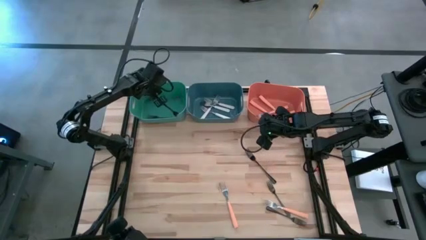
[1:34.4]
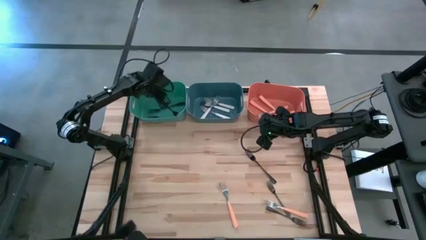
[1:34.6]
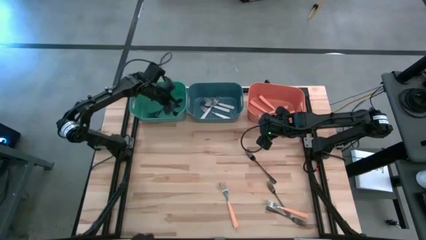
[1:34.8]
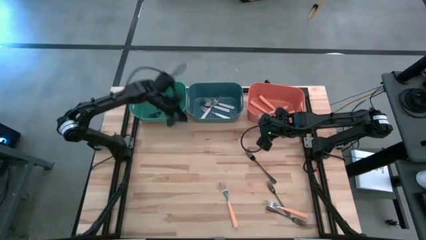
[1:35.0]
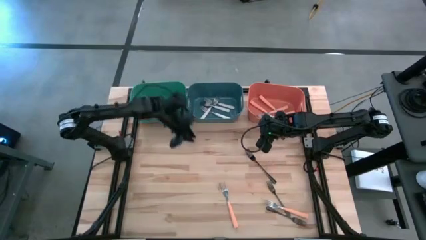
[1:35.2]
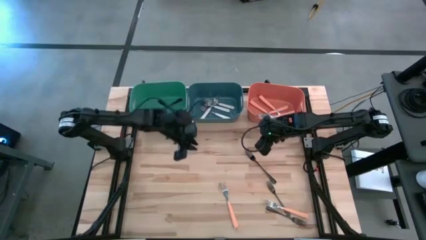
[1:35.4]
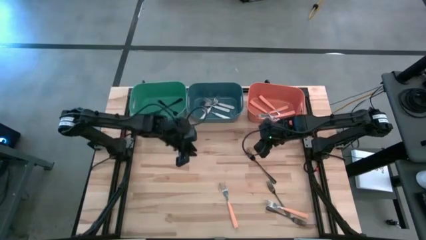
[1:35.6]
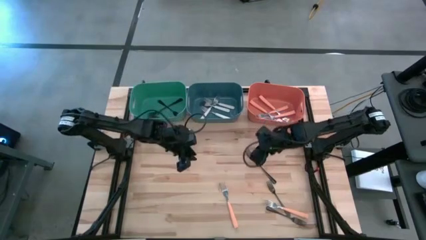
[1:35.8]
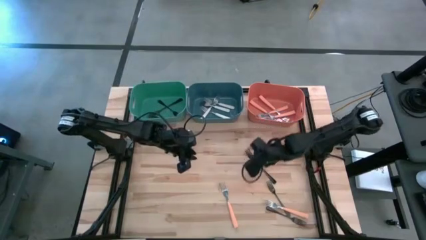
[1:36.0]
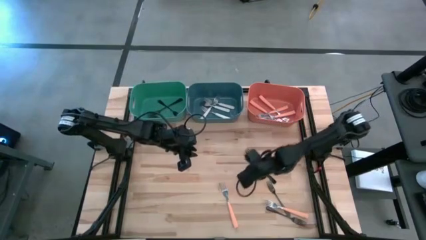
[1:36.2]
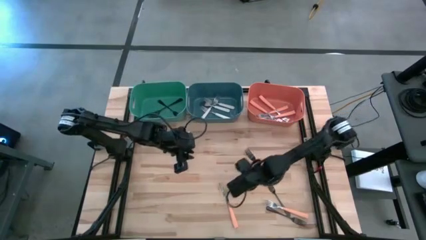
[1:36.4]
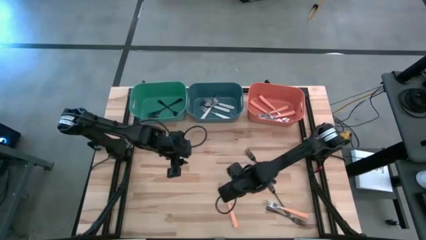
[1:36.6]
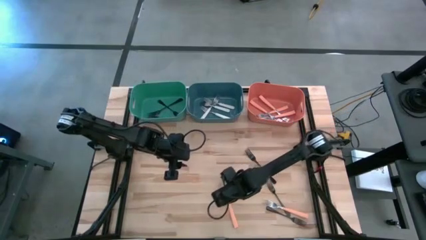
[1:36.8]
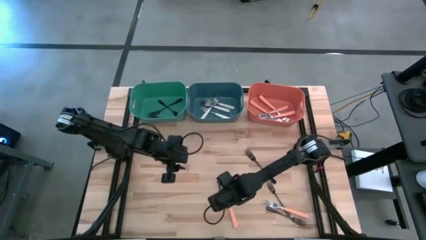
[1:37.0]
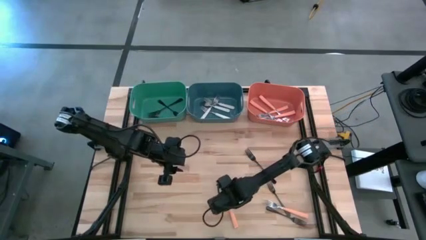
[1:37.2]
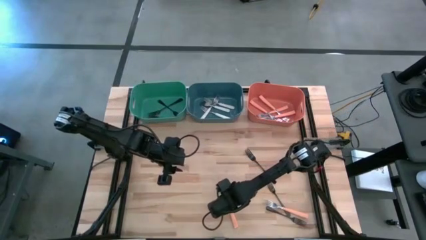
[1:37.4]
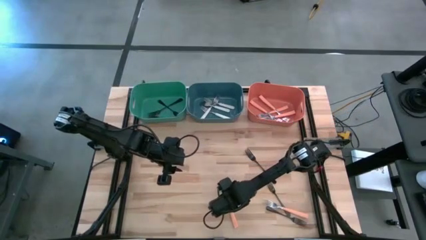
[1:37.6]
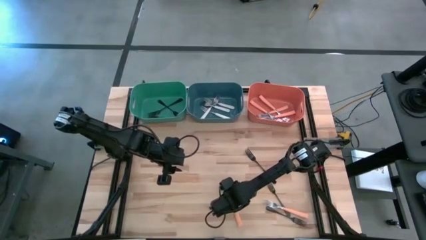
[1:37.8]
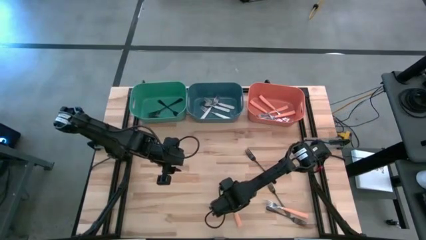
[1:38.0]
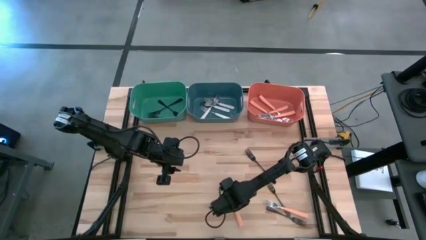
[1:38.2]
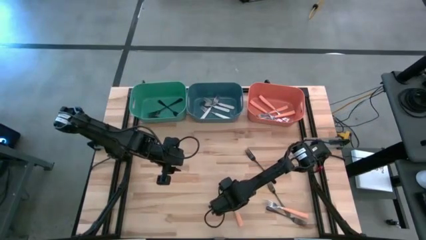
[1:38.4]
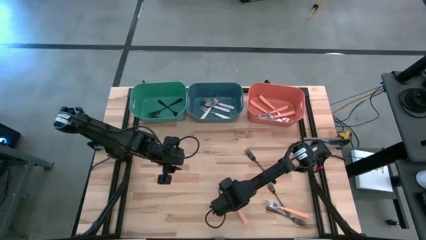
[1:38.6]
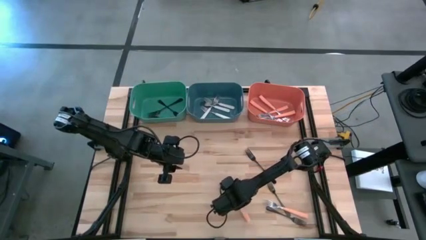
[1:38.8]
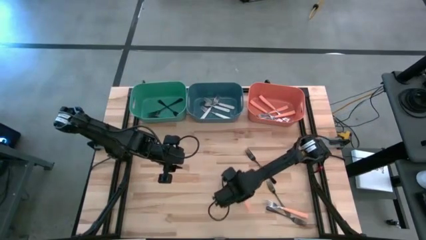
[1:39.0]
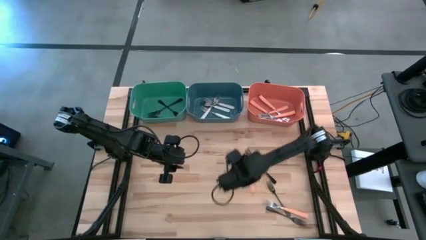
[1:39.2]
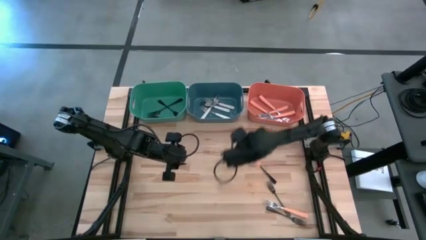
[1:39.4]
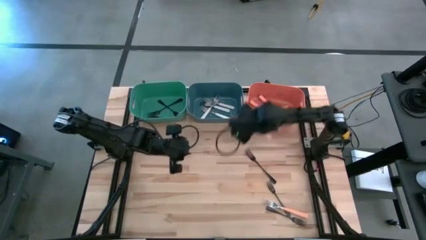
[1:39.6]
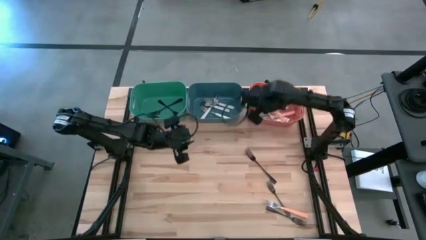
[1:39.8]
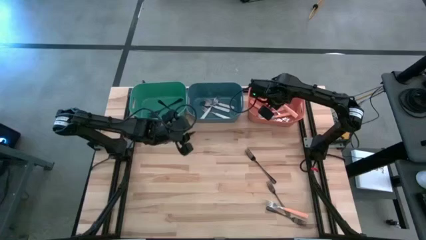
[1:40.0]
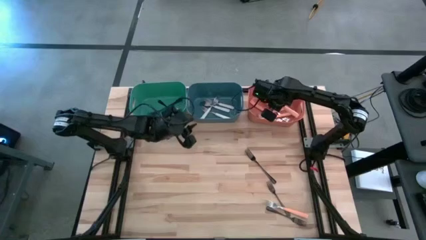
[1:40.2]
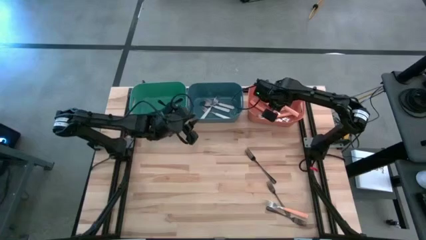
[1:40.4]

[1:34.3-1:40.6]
Task: Sort silverware by color (type)
Put the orange fork into the orange bin

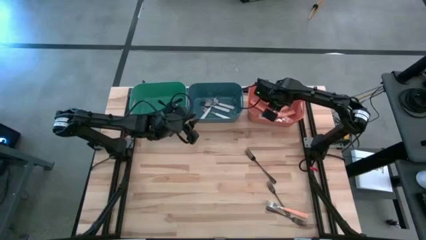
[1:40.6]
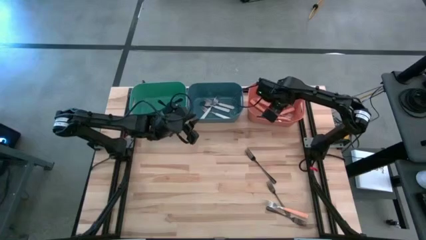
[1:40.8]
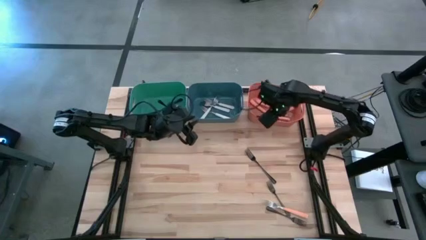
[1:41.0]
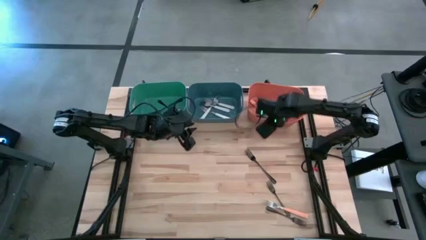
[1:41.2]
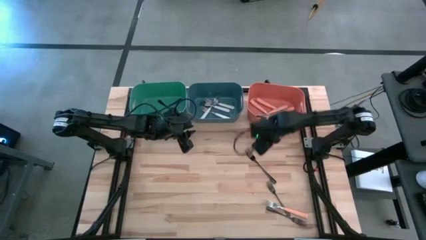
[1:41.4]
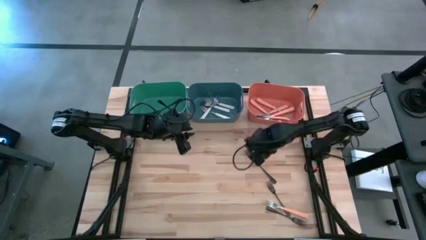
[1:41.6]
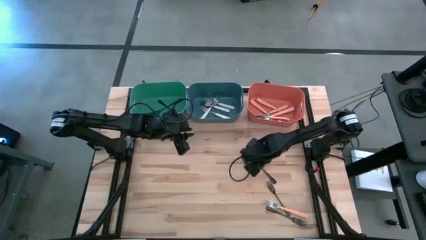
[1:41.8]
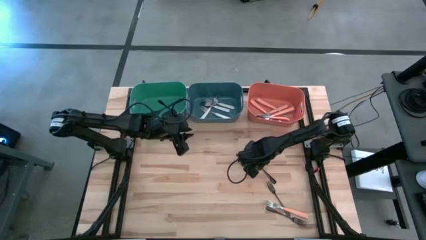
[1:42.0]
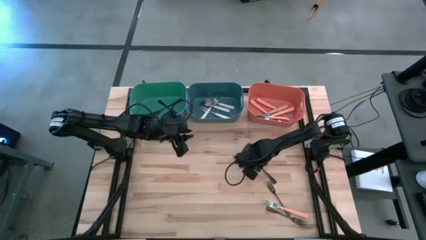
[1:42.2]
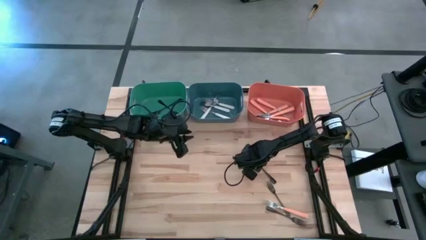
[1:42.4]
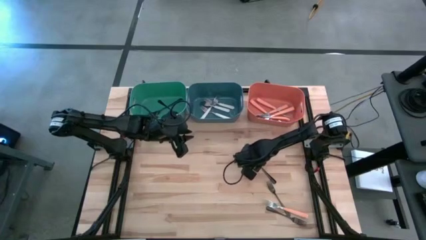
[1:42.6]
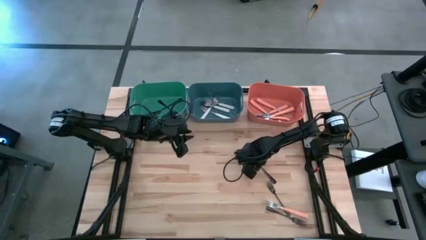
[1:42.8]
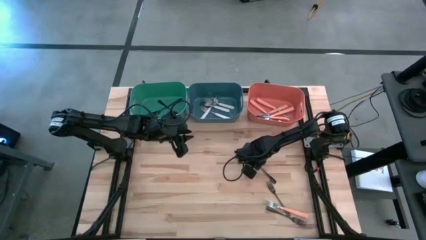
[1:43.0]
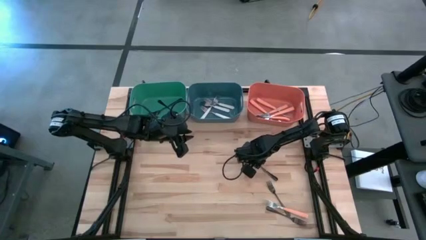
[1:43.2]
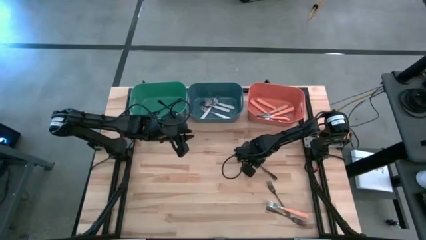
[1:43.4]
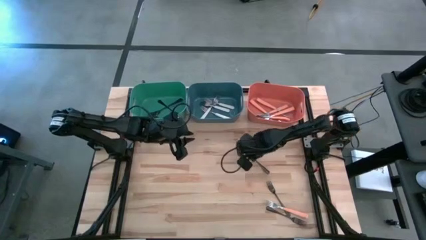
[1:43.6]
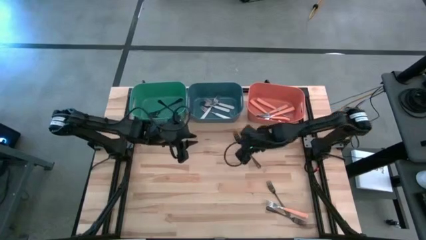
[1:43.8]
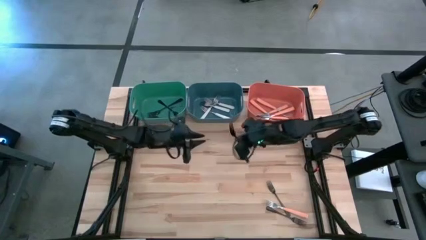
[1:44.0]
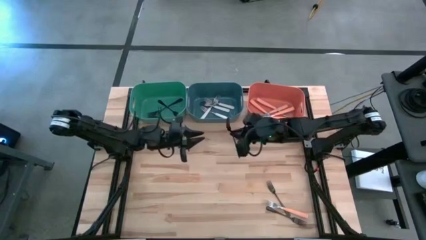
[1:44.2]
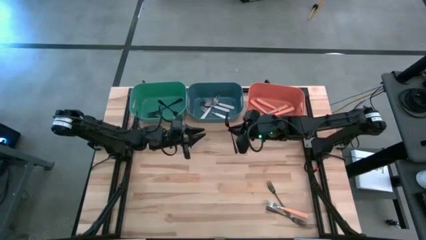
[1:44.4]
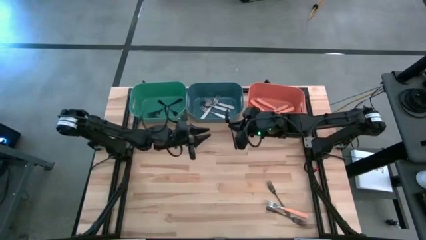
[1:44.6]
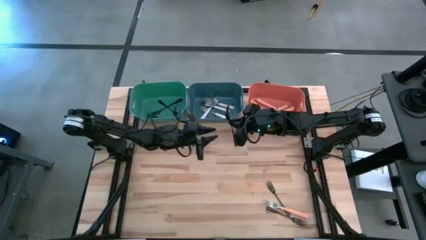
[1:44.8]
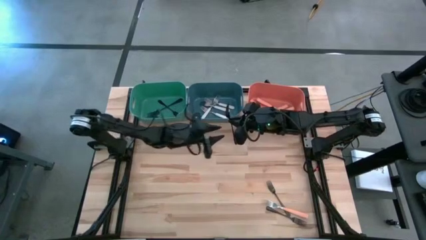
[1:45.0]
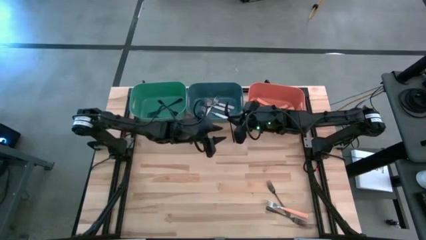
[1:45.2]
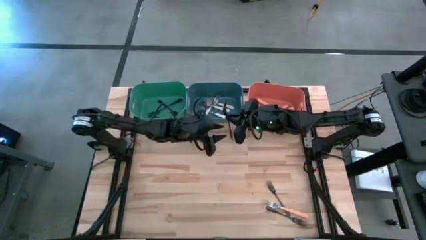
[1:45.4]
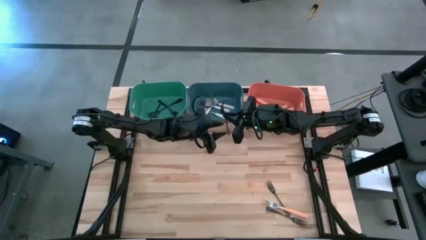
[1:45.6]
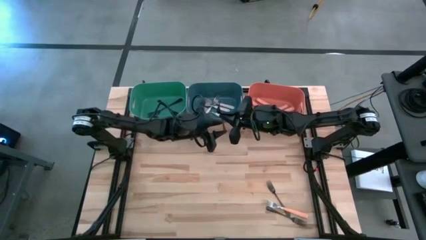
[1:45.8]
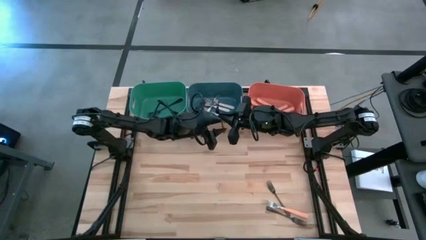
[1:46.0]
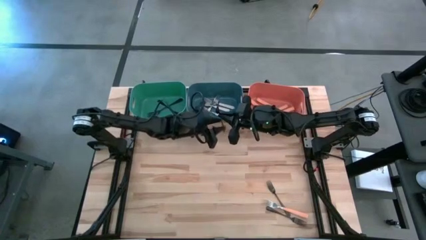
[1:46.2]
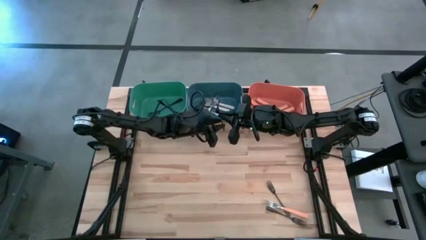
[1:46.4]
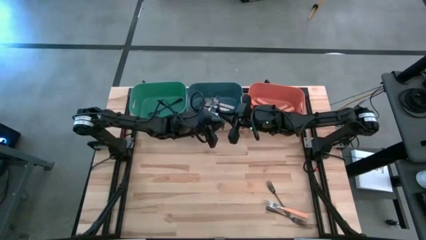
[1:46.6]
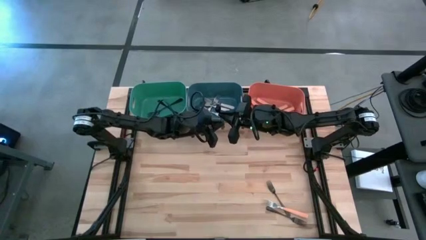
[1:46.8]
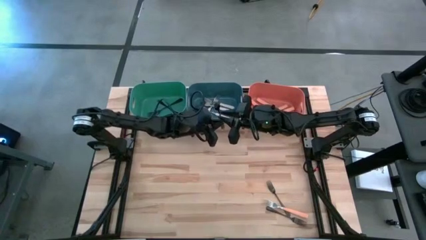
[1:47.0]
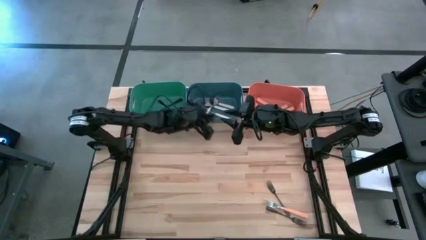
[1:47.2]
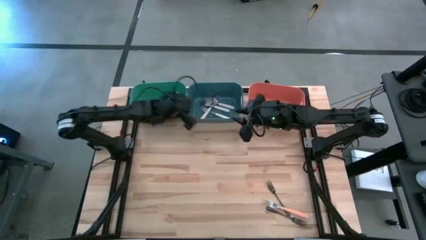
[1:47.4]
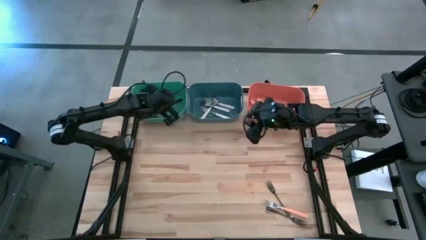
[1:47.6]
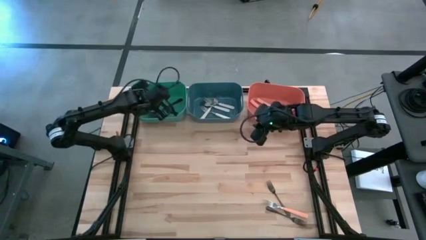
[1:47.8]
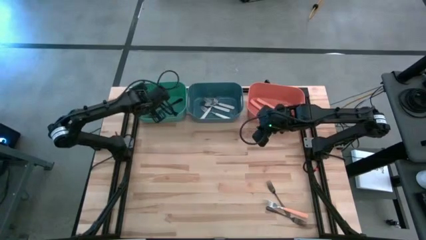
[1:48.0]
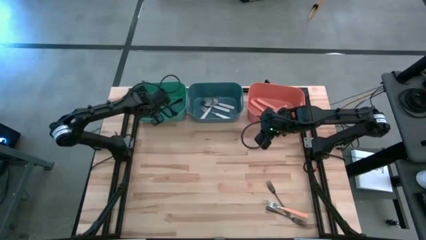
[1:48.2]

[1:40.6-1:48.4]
Put the black fork into the green bin

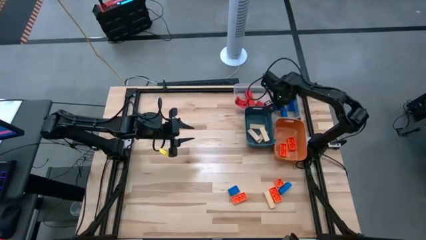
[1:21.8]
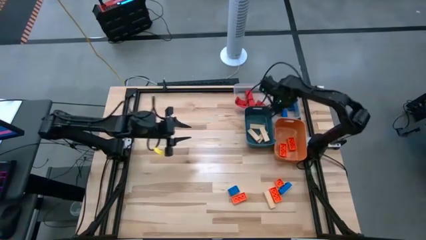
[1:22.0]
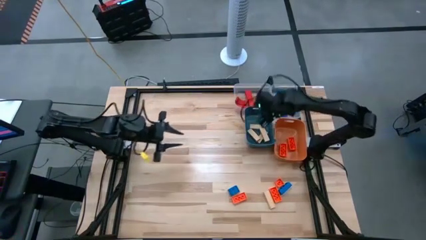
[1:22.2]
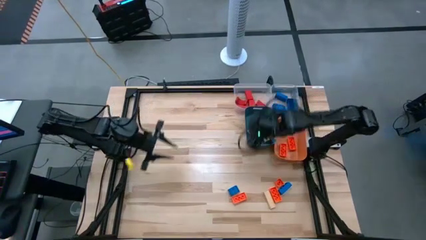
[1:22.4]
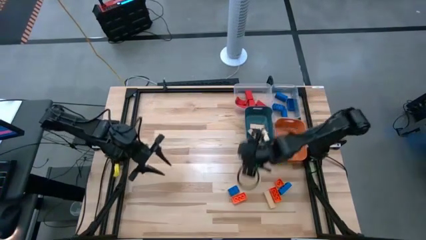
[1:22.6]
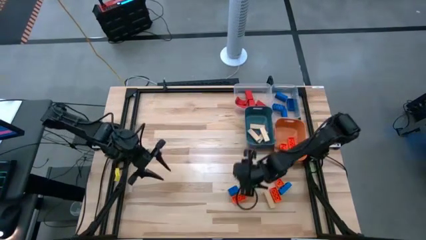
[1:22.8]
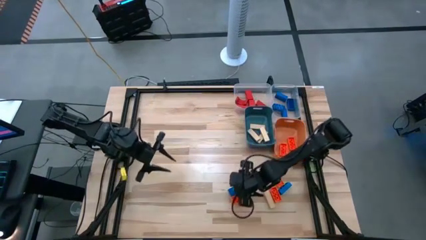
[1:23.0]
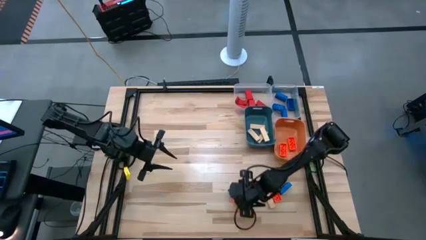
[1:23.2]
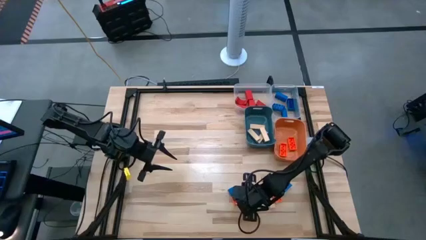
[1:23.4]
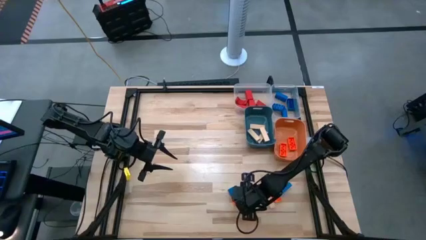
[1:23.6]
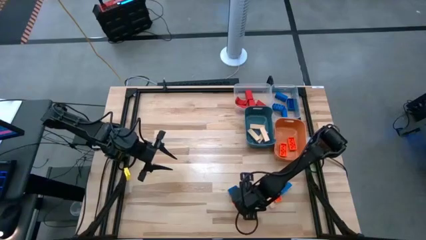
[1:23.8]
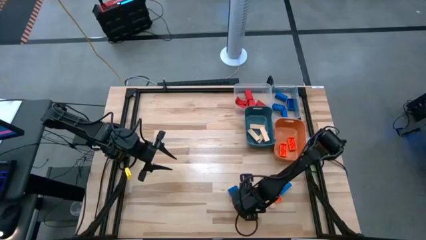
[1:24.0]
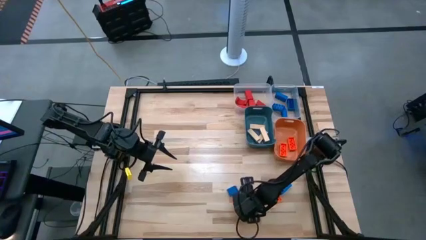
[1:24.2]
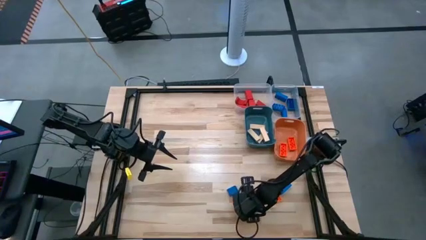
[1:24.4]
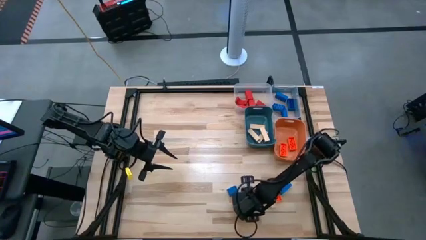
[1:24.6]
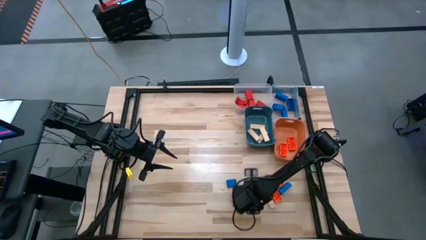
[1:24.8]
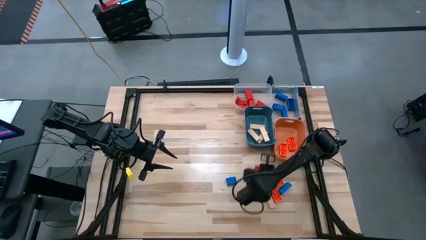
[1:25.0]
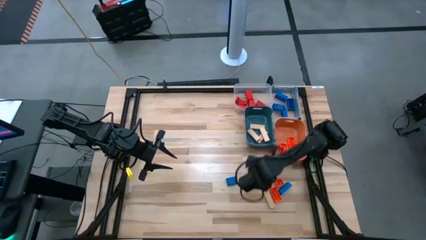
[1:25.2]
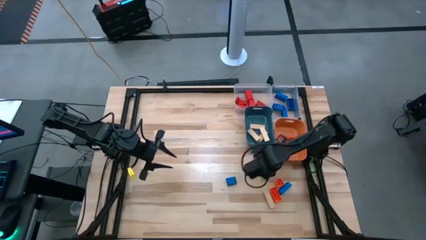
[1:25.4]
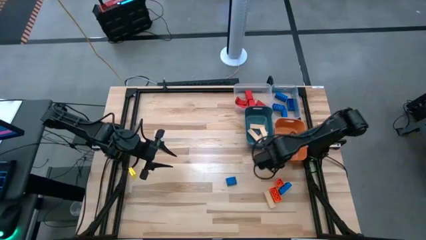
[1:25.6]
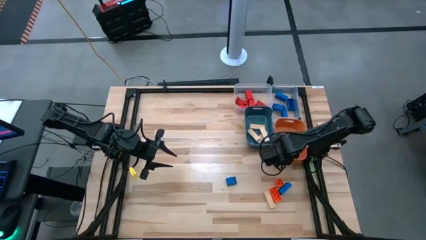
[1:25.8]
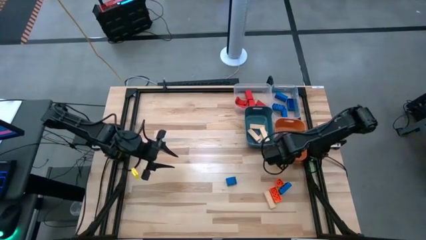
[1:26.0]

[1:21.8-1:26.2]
Task: Sort blocks
Put the 8 stud orange game piece into the orange bin
